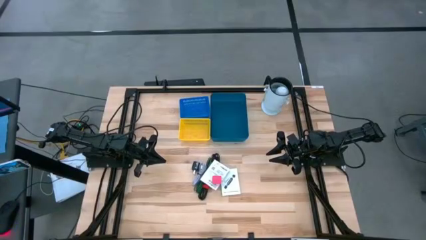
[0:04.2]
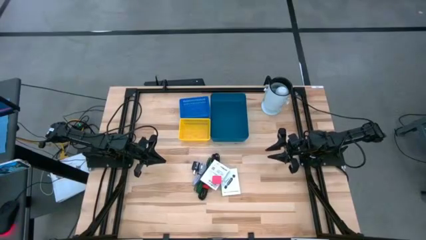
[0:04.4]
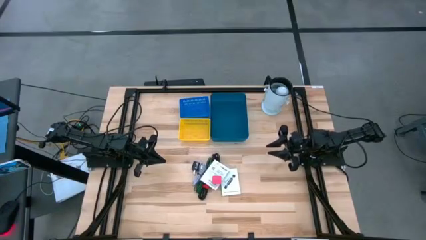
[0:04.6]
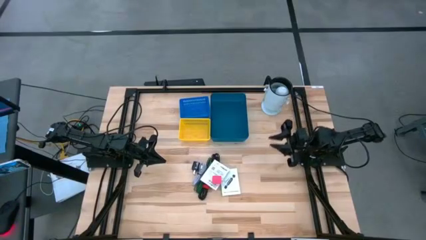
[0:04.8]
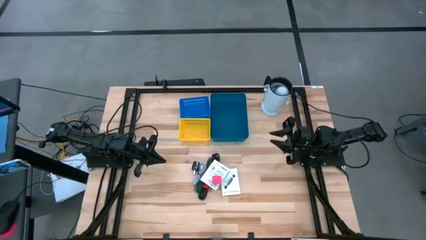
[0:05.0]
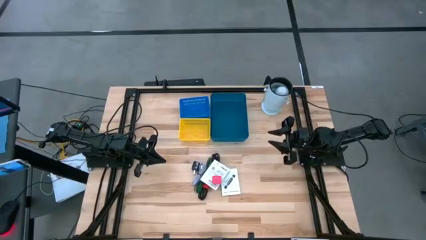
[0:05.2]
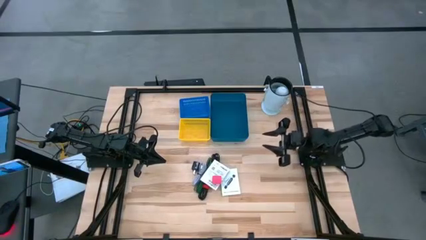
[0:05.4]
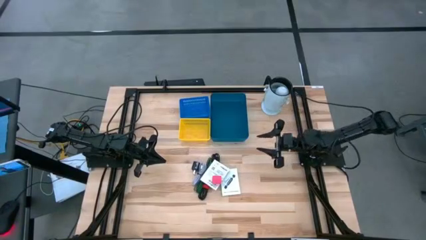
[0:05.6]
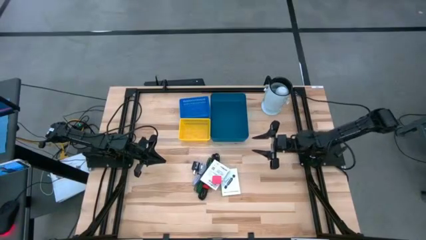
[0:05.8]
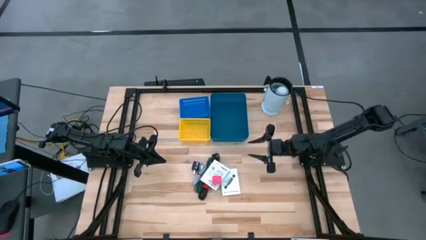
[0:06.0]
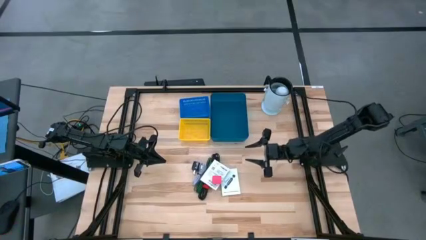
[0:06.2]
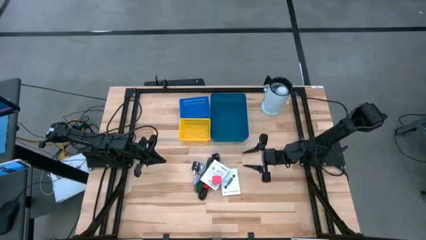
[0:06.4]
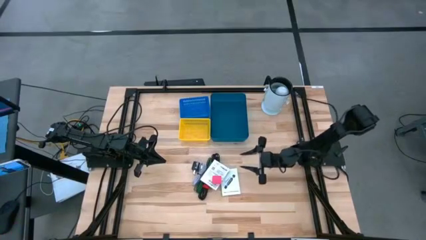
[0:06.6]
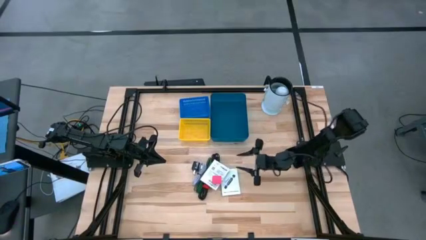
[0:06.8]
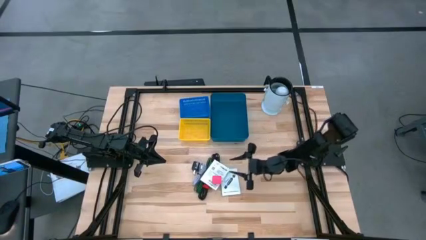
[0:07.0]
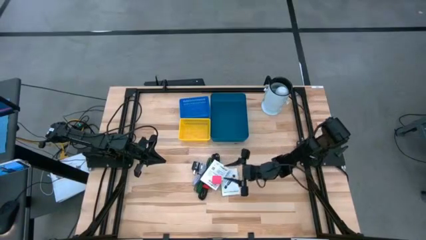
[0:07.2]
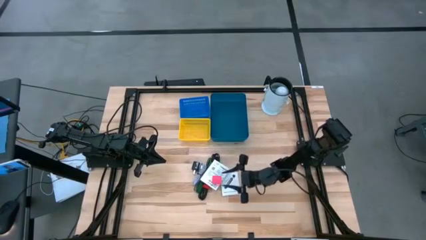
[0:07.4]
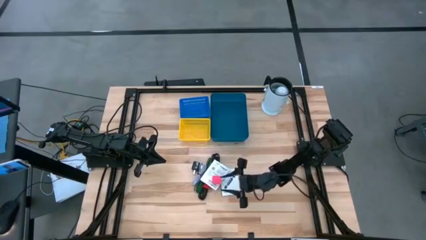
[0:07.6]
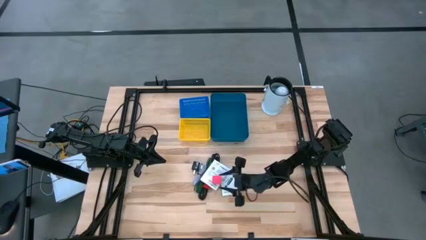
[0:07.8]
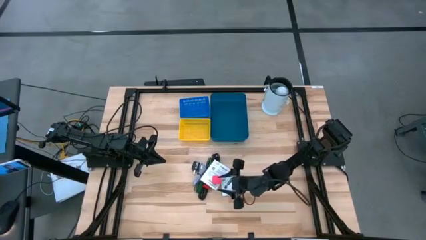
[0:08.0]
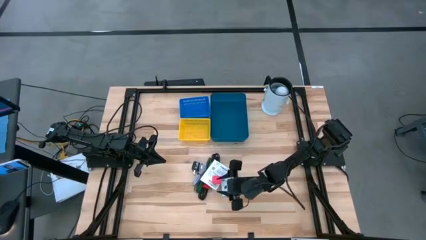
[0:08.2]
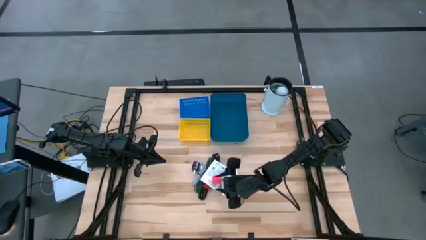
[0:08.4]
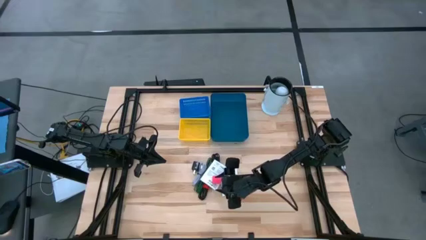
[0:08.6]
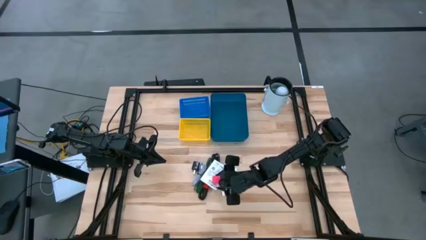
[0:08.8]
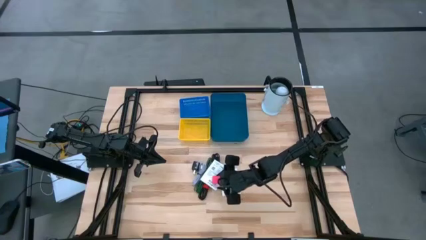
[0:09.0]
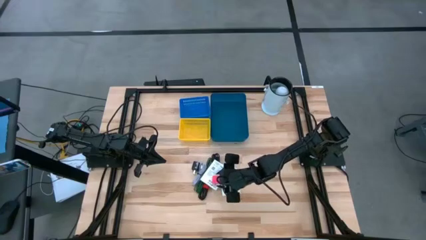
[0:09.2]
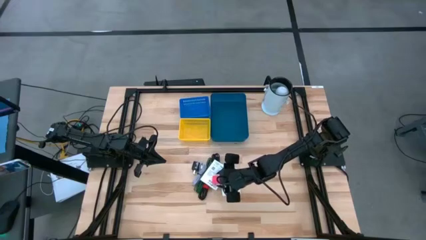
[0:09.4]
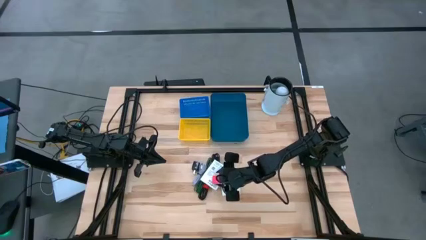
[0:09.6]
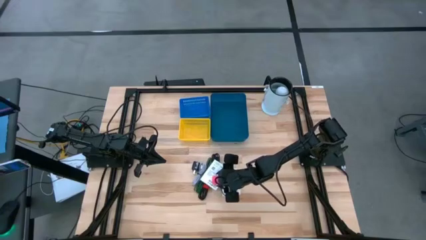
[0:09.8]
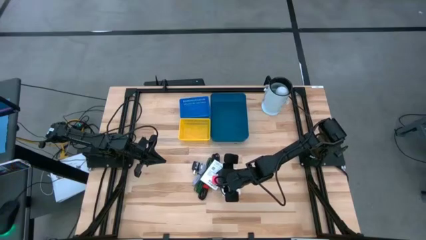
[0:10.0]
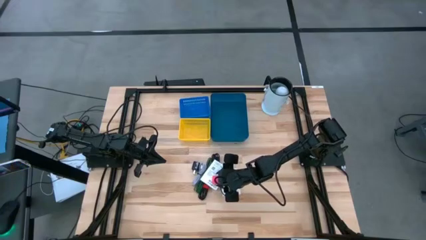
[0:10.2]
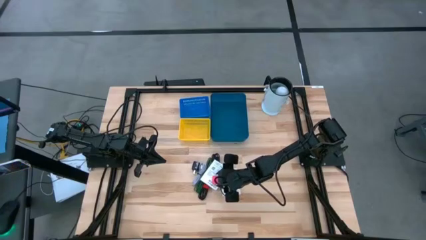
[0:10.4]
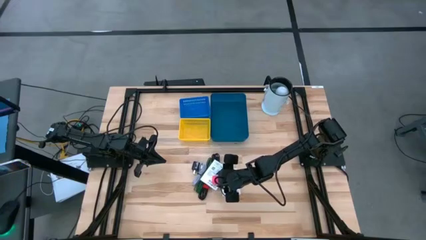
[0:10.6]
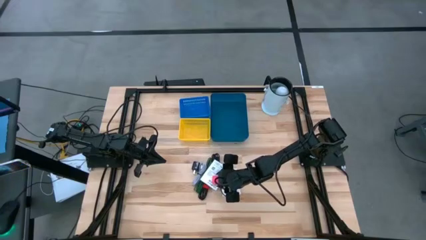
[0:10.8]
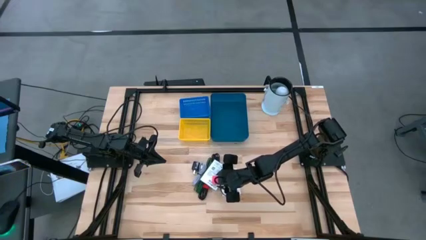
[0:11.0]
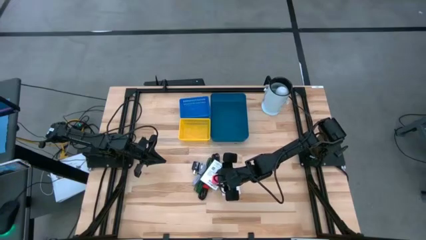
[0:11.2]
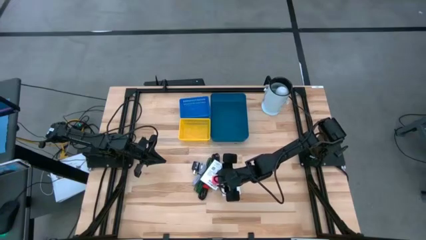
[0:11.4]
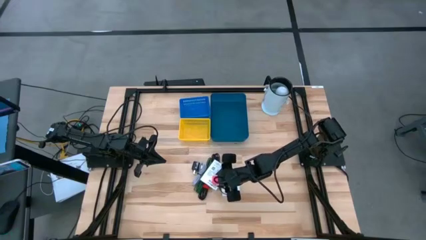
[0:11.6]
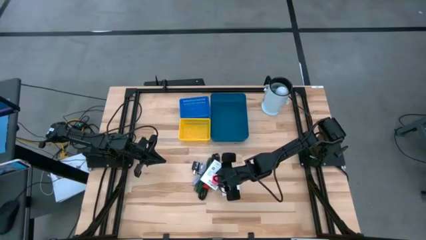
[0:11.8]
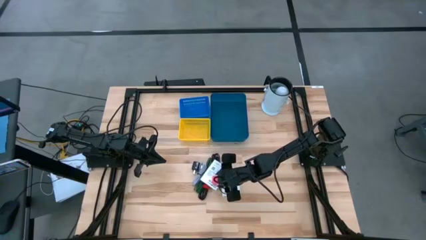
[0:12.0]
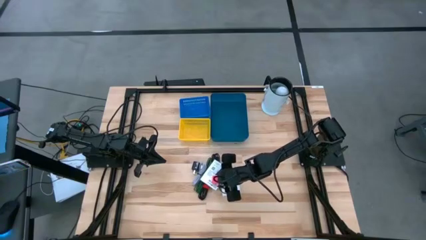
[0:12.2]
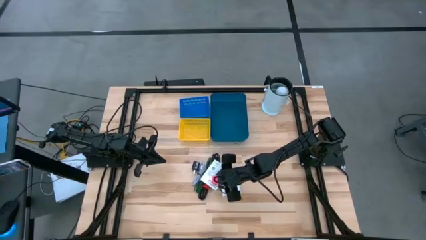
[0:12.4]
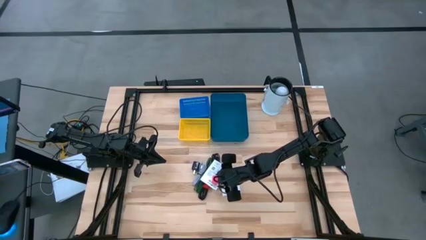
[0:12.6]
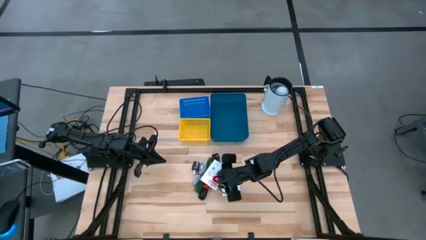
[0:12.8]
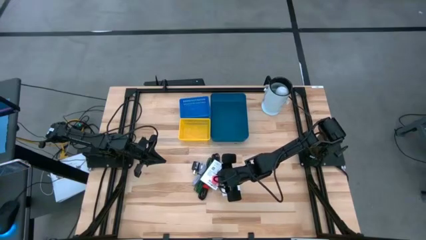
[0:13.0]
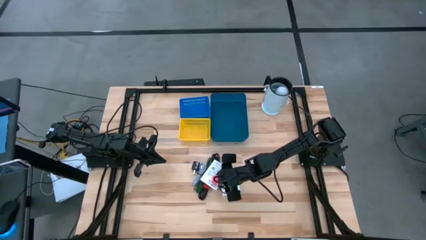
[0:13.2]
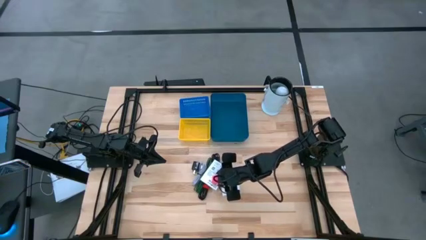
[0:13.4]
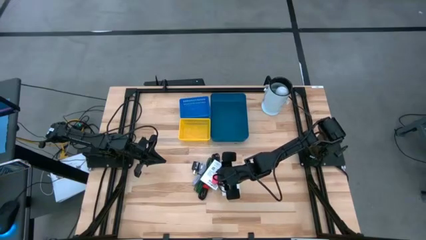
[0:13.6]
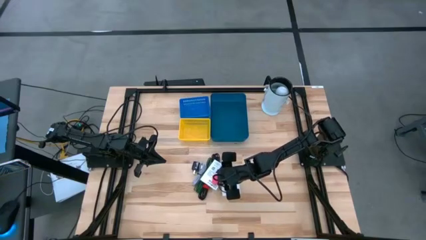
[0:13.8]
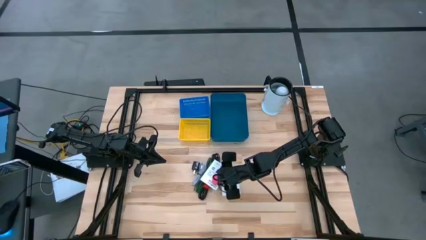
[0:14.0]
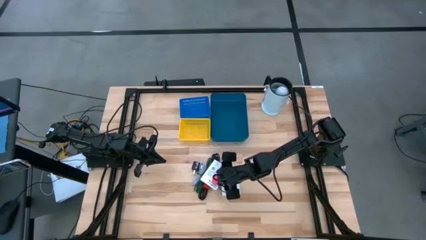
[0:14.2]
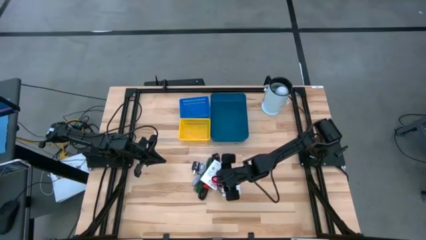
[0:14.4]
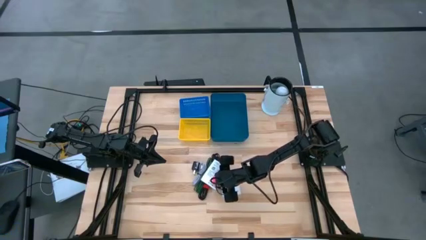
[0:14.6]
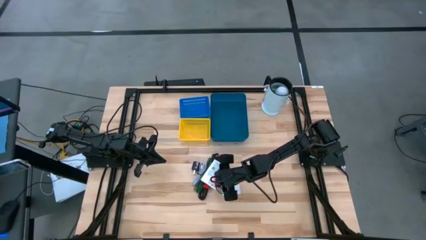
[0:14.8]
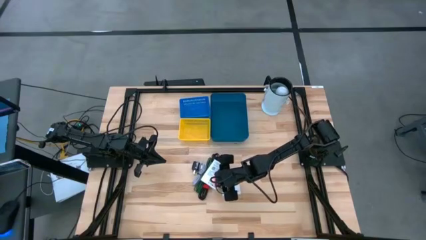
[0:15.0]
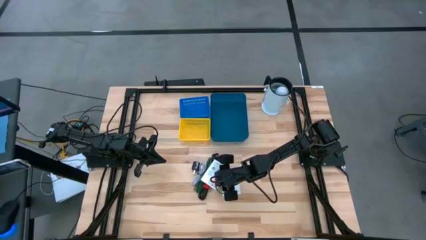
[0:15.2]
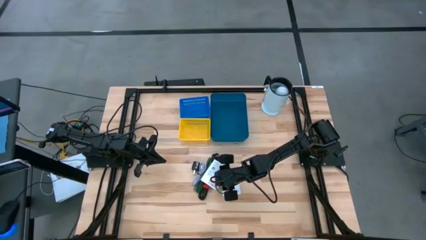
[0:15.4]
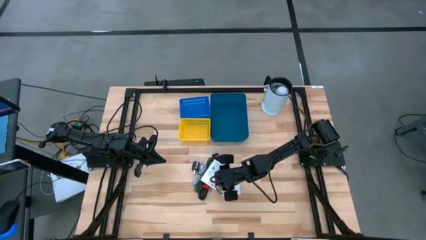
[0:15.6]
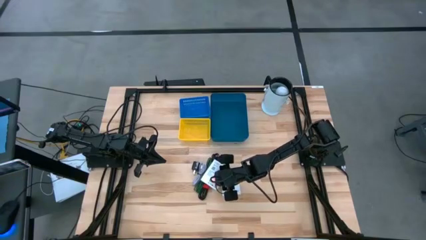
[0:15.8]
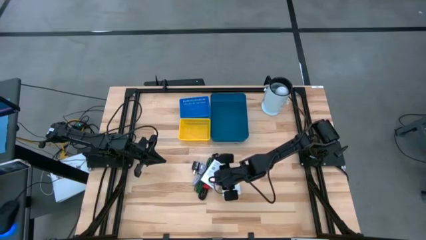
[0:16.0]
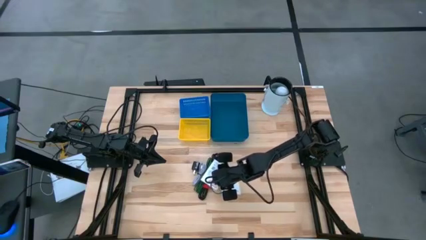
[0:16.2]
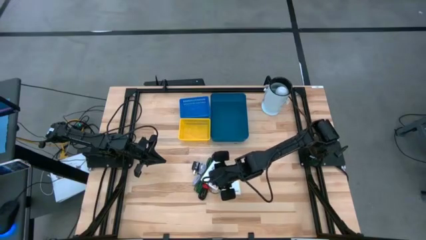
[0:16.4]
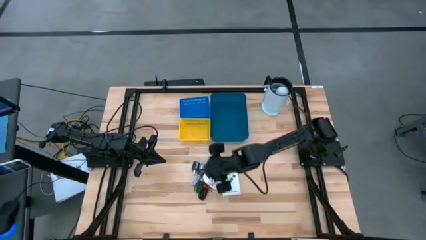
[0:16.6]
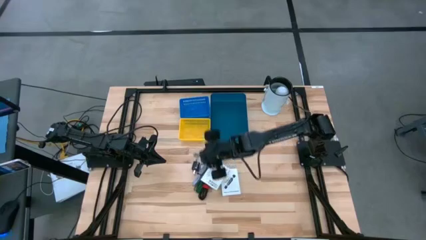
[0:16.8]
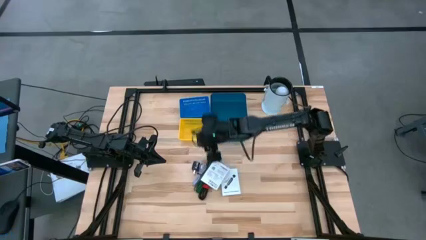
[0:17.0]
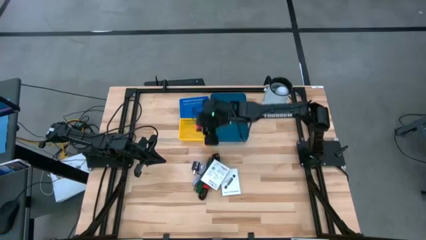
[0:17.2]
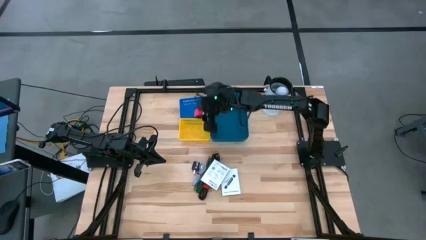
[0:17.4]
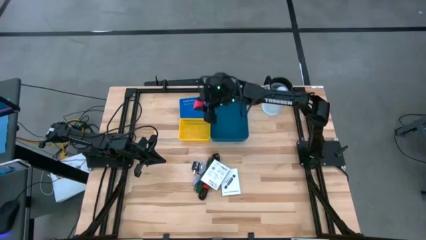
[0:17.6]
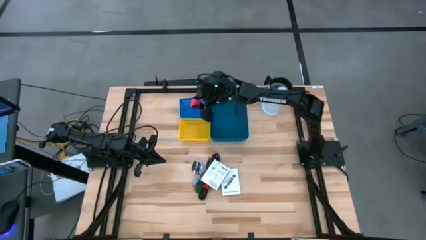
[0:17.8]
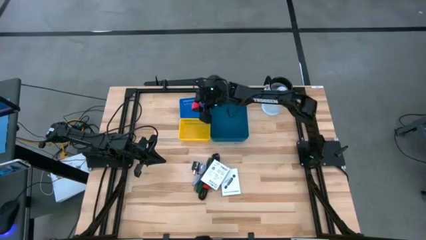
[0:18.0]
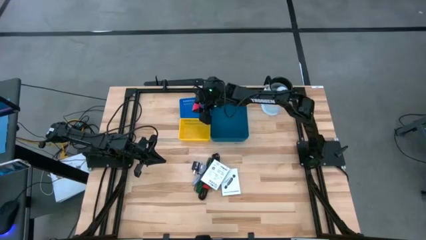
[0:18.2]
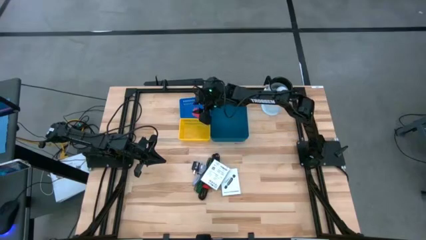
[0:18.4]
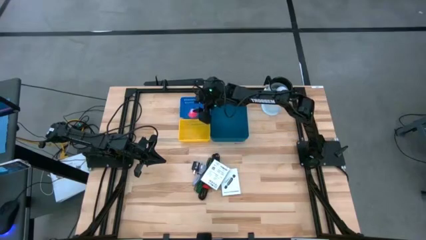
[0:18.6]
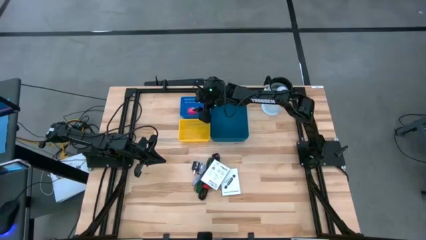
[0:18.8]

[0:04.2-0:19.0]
Task: Pick and place items into bin
Put the pink charger adapter into the blue basket
